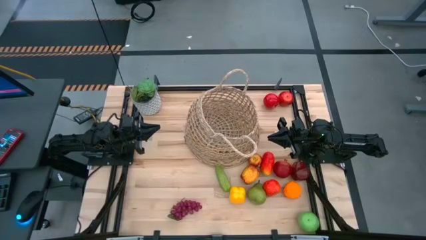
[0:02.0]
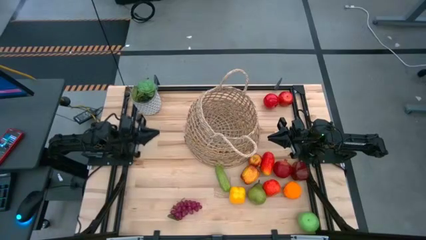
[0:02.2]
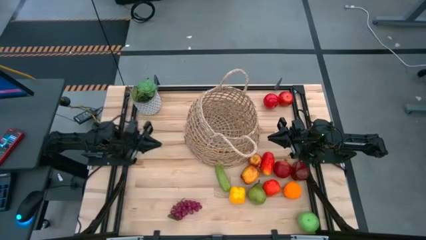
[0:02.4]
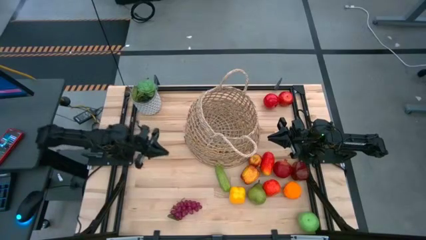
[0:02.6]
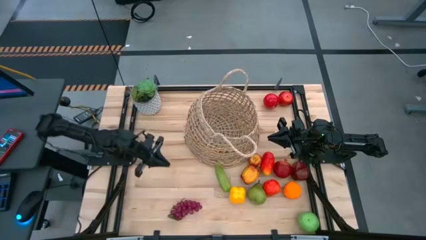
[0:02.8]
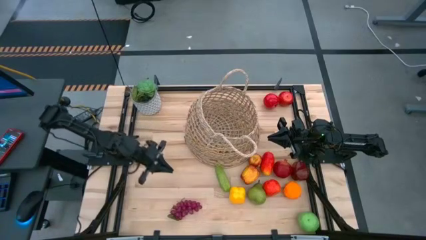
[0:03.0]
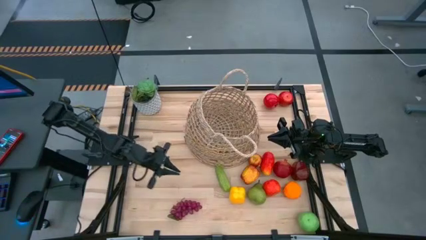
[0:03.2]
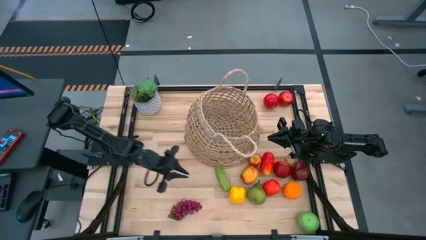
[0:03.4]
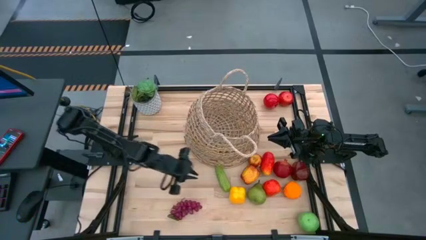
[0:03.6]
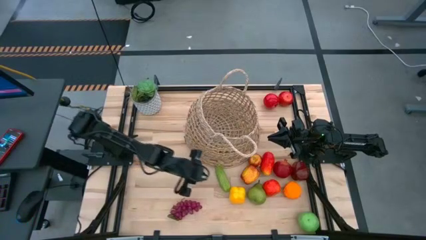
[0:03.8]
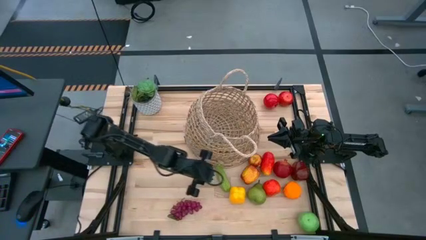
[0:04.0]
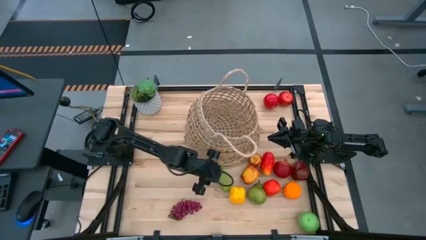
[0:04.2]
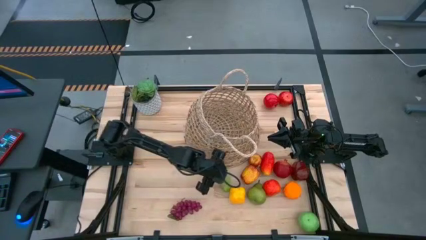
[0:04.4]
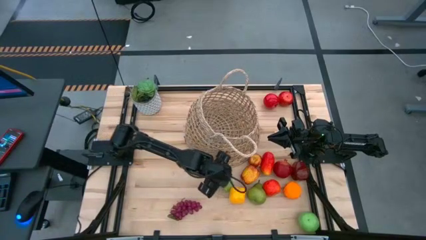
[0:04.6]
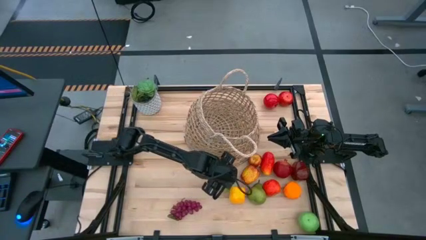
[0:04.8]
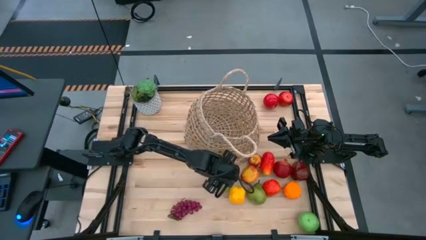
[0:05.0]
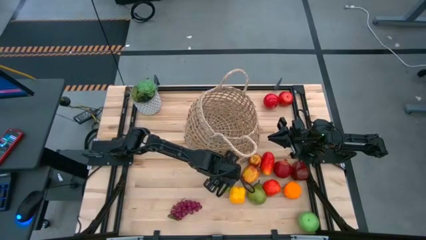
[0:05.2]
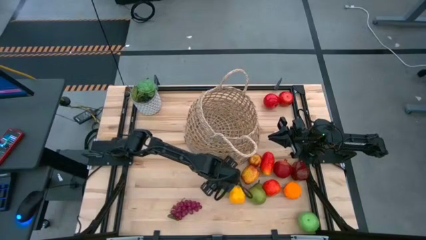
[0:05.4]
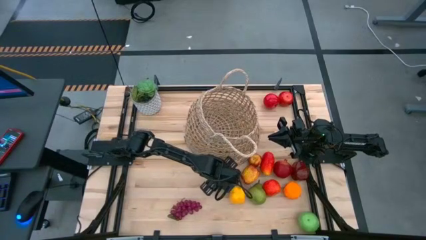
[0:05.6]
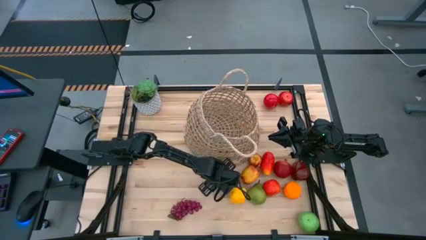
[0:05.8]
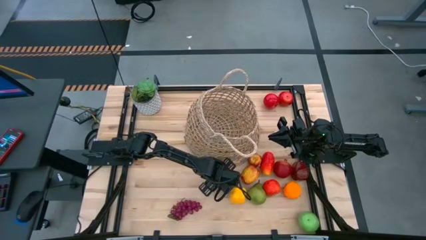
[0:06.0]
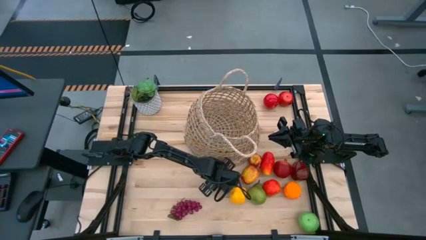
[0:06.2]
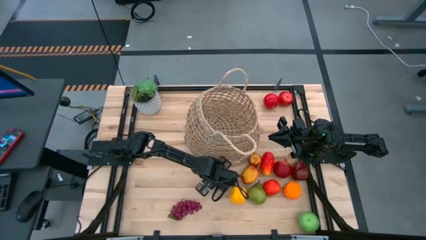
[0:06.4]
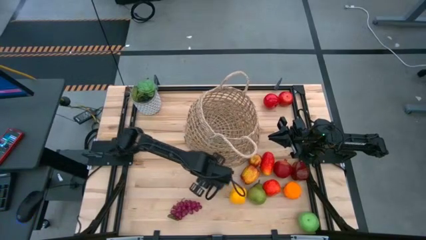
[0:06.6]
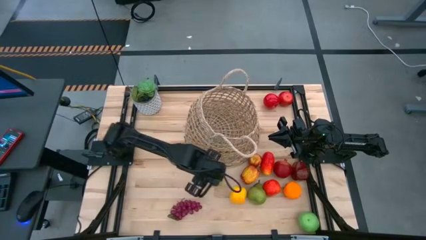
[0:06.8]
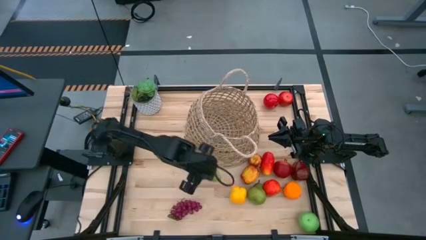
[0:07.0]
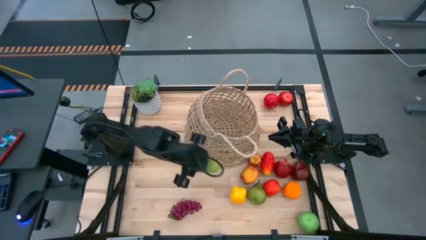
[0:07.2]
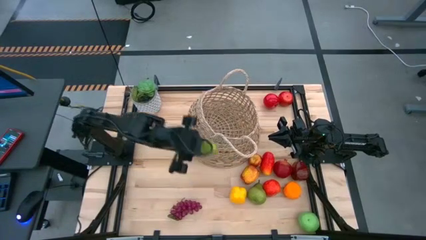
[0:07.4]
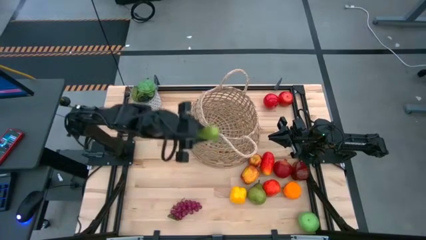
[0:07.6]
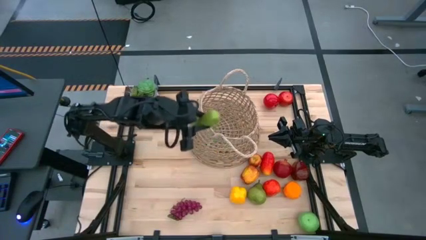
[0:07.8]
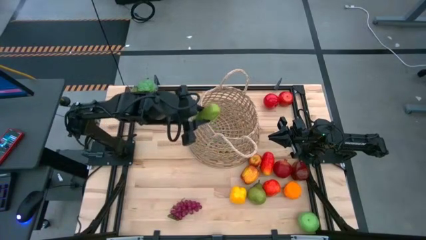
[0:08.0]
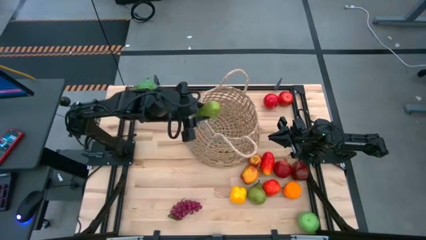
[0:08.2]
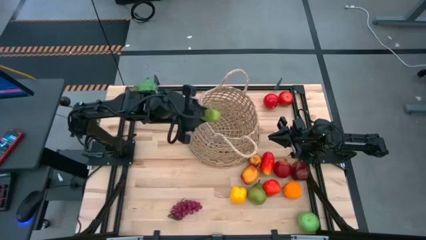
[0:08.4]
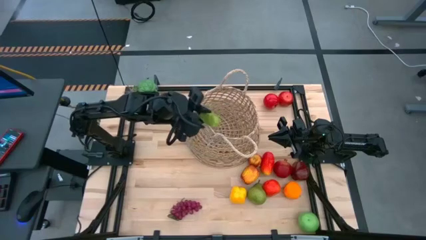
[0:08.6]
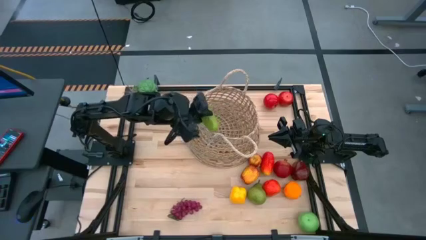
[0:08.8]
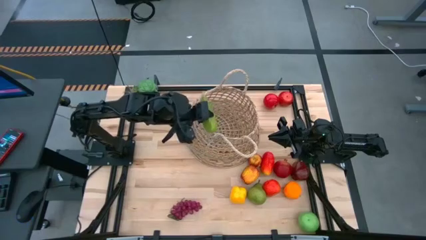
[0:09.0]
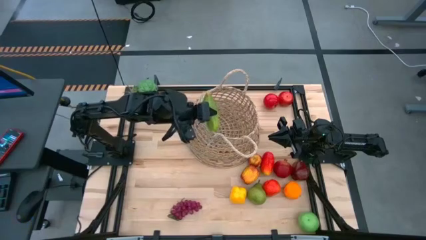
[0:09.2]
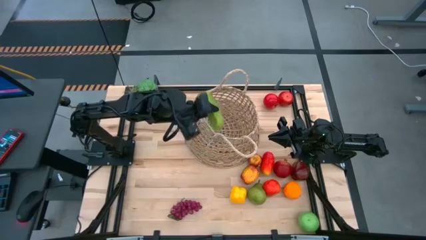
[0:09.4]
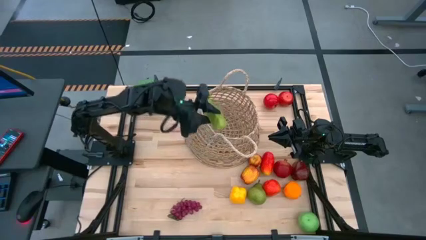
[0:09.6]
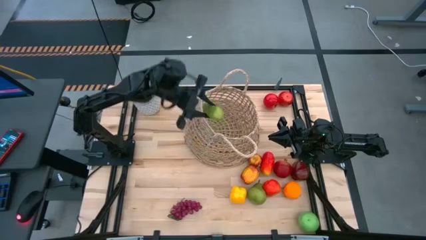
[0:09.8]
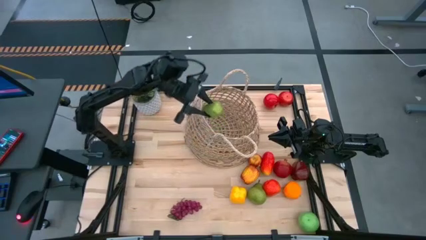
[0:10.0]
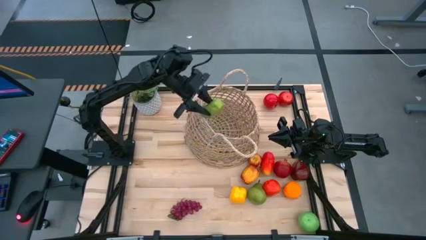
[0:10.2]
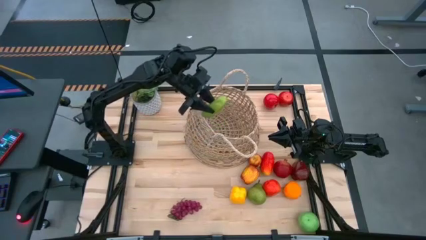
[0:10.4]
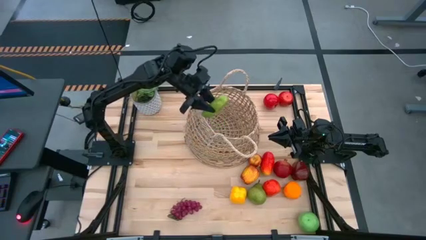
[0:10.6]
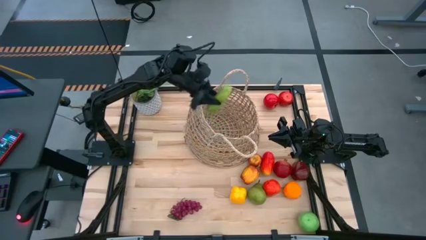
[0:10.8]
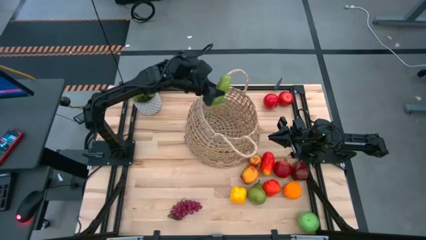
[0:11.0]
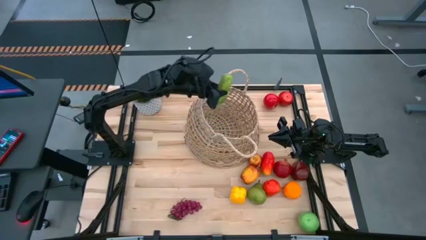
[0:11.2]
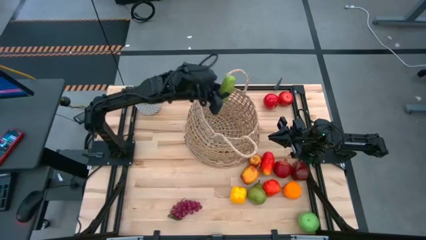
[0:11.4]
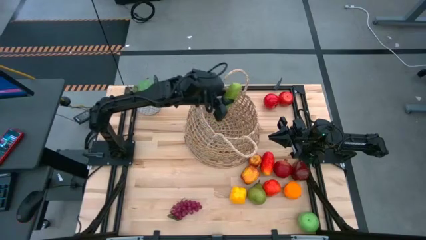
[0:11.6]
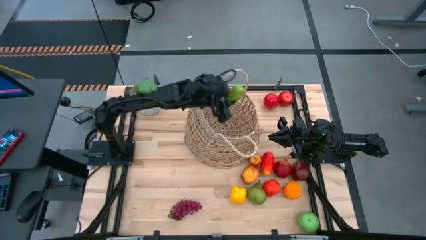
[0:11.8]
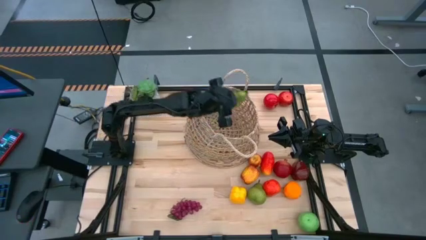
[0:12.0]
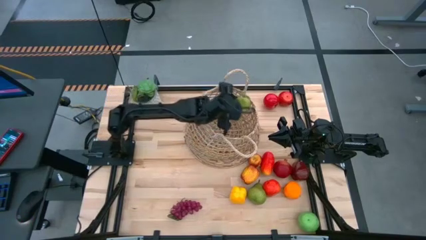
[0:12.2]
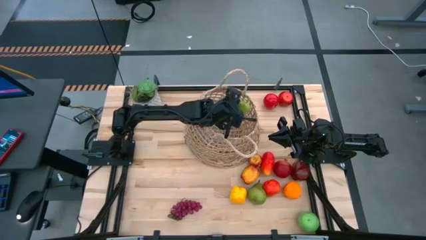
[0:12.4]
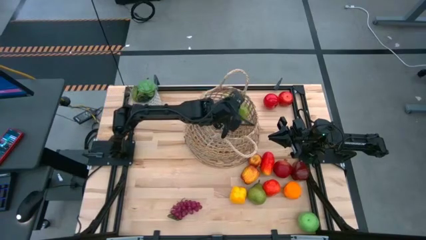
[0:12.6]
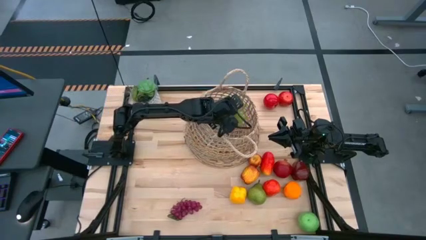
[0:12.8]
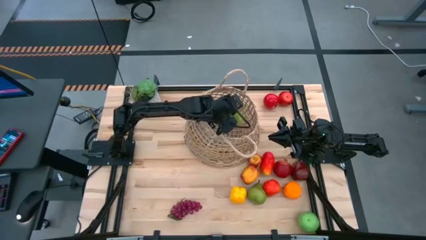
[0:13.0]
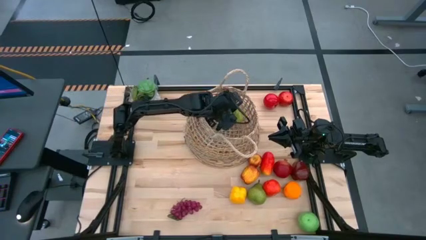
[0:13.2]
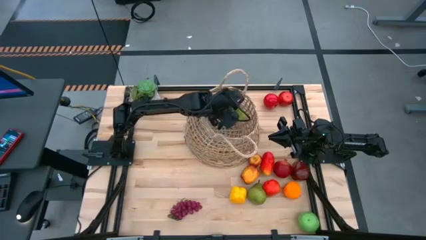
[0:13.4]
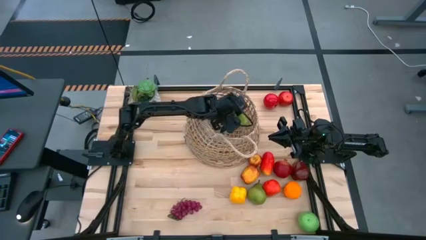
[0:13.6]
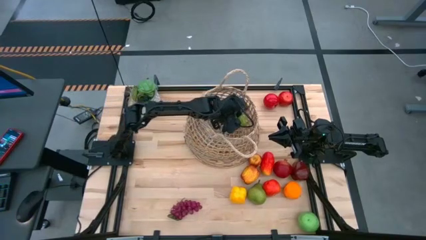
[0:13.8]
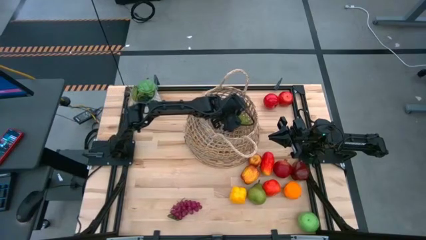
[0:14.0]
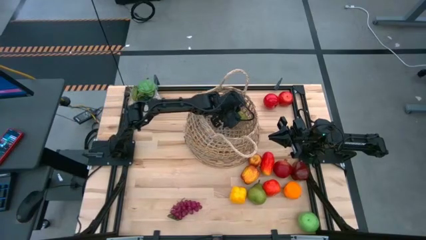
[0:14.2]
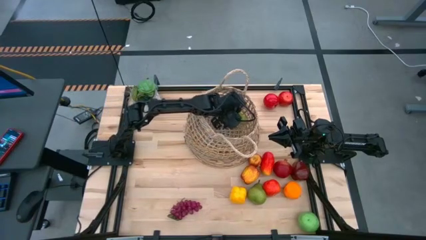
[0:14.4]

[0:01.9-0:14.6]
Task: Build produce basket
Put the green cucumber into the brown basket
